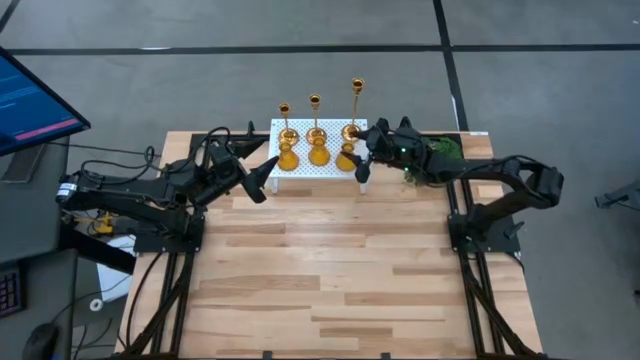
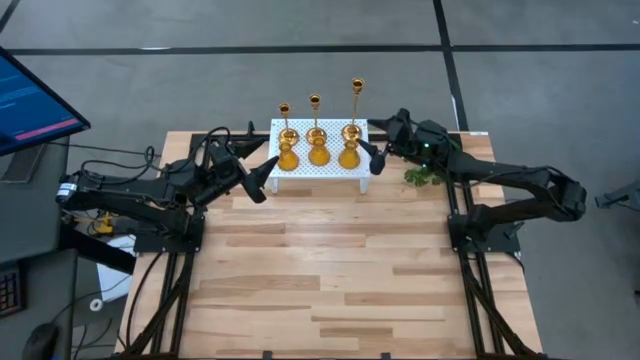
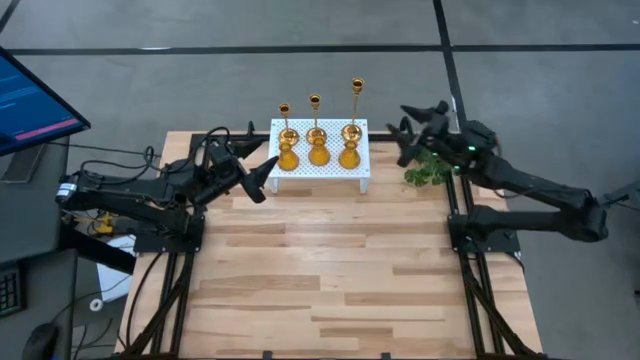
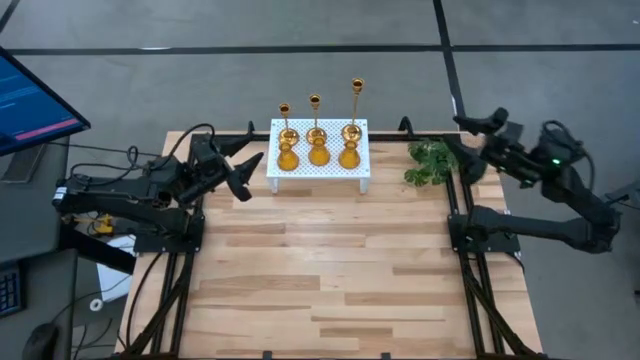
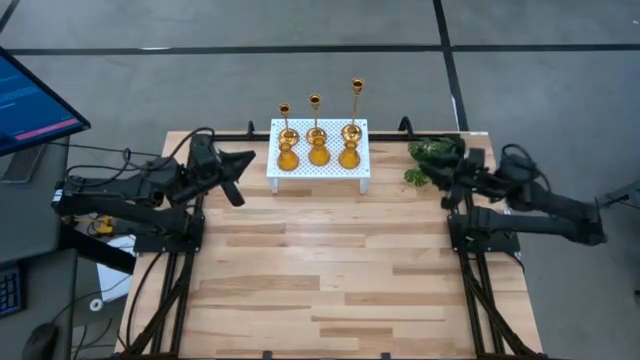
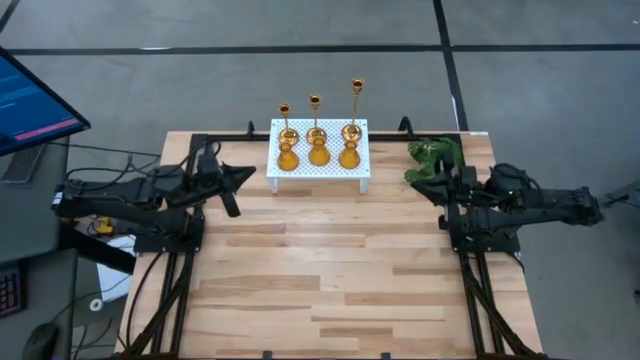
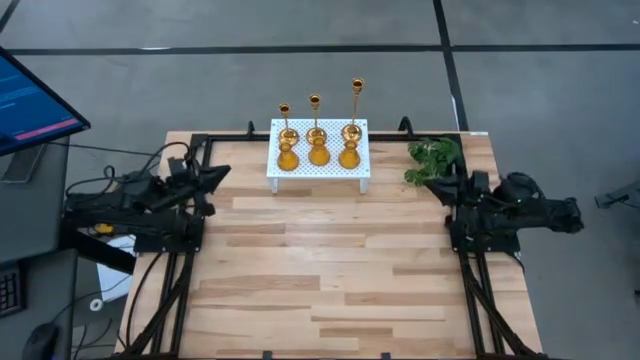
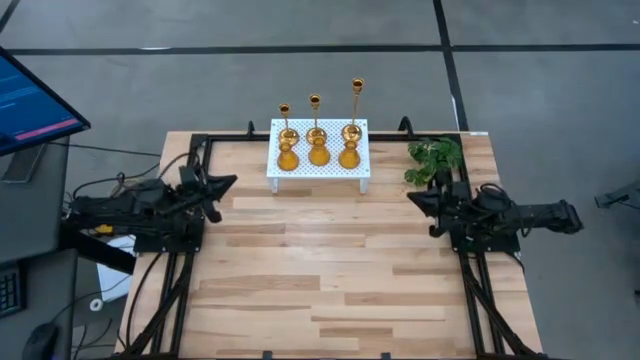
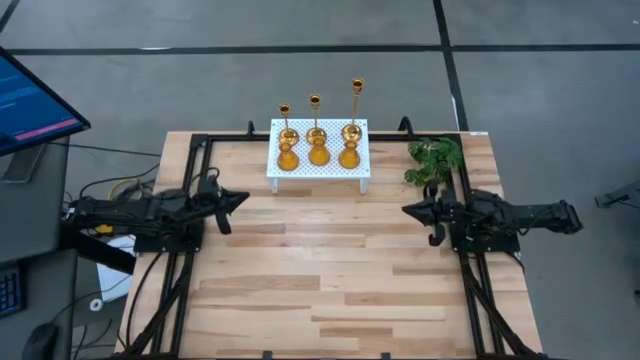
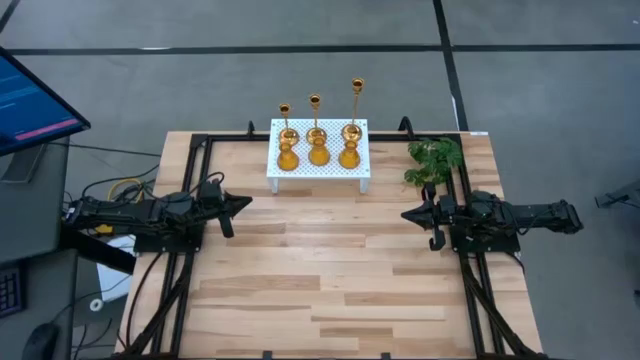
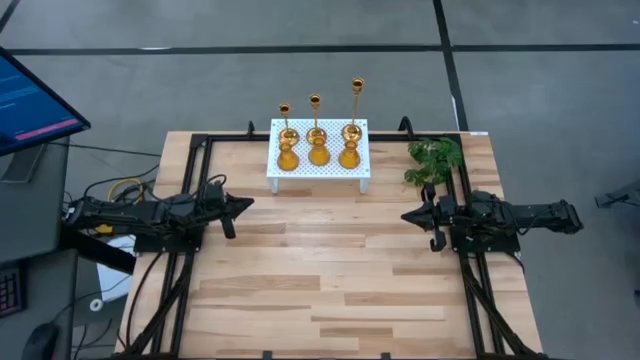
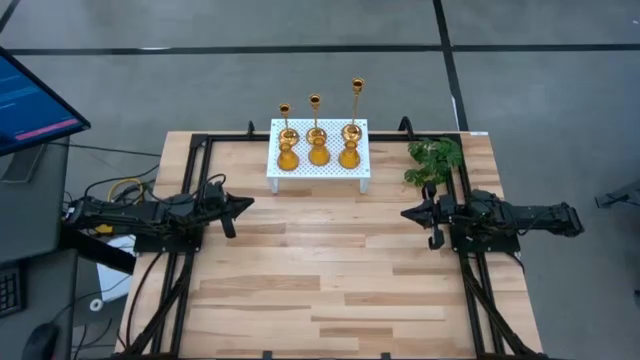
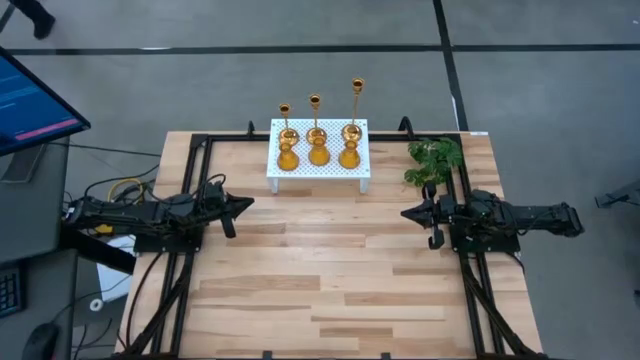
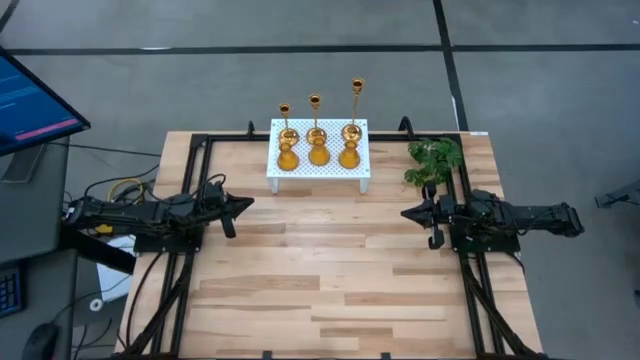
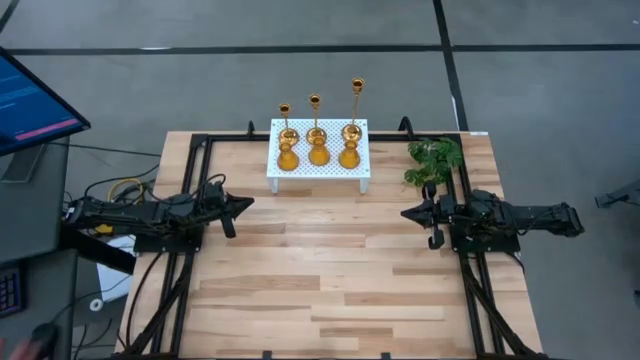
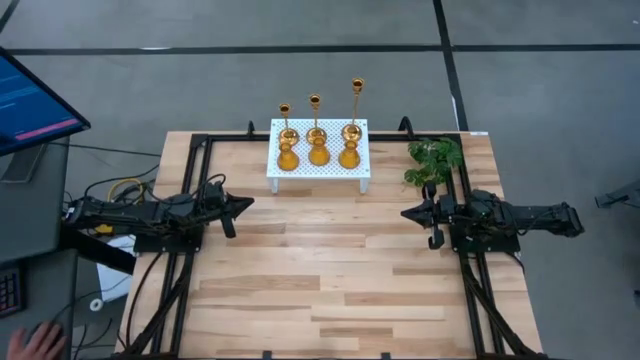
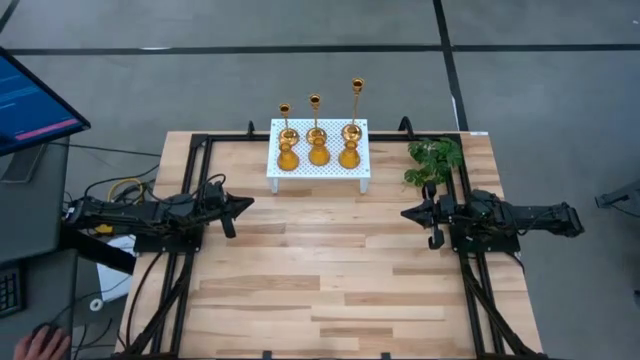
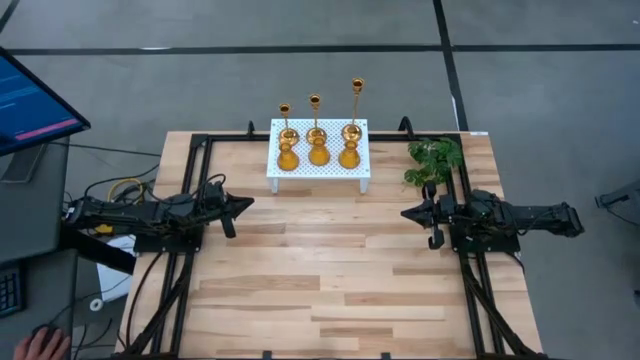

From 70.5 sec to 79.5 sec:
Task: Pick & Place candle stick holders
Return to Home Position

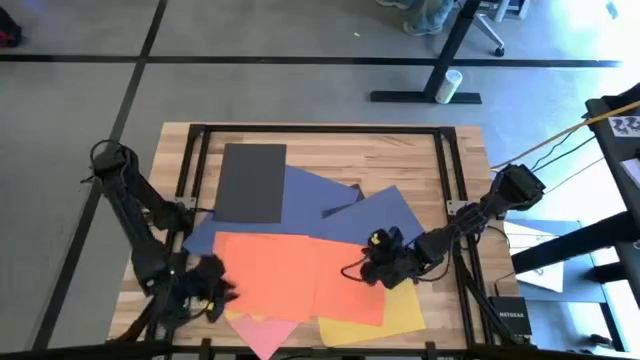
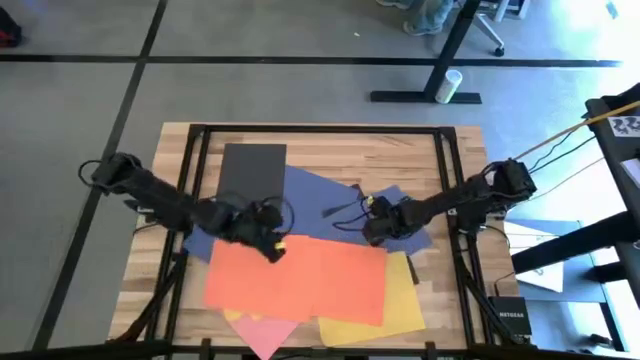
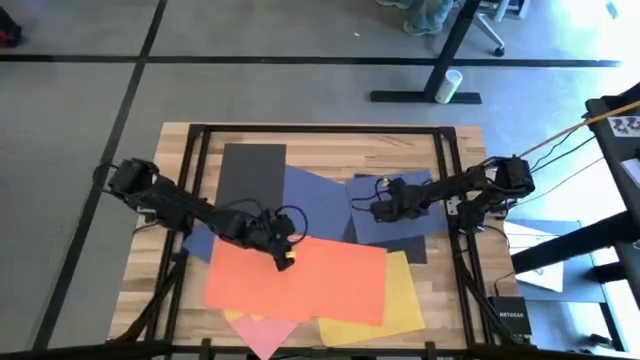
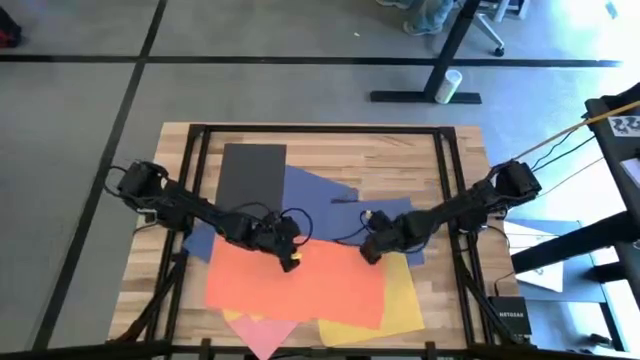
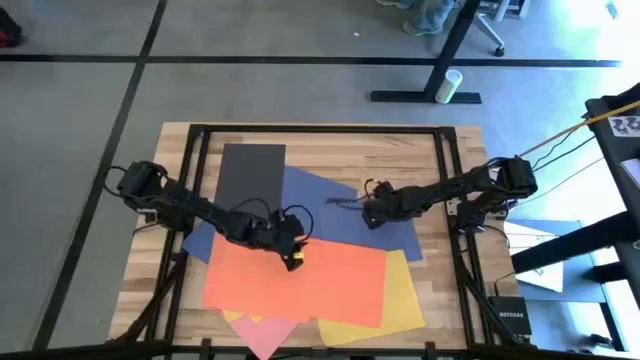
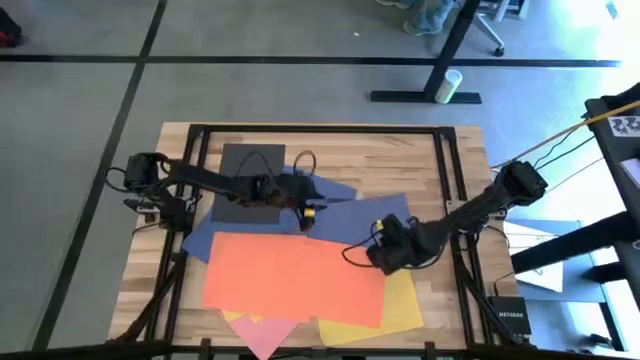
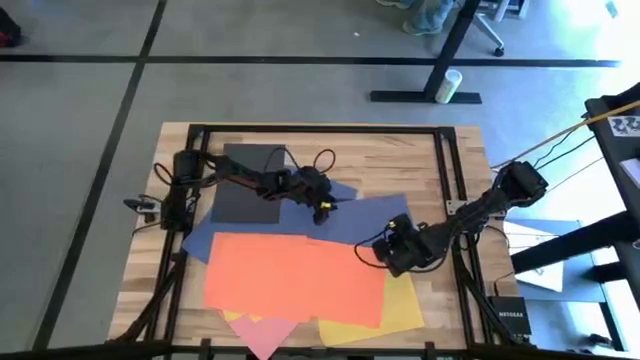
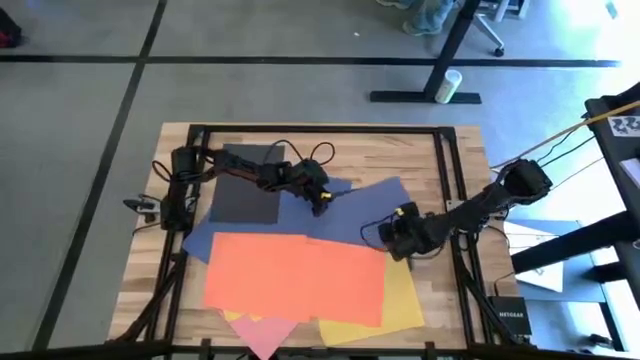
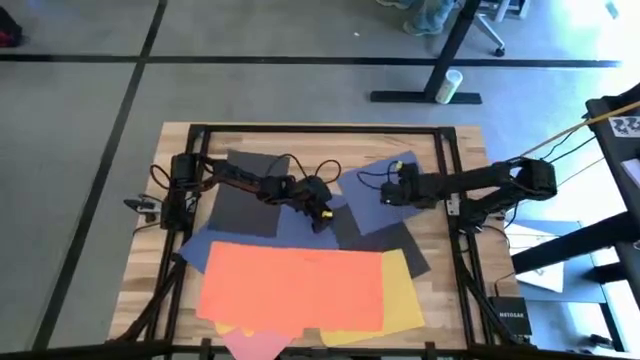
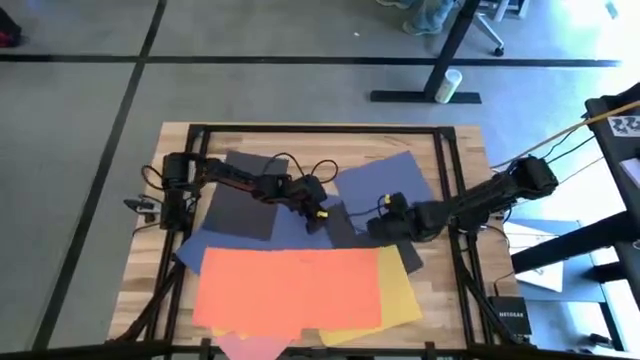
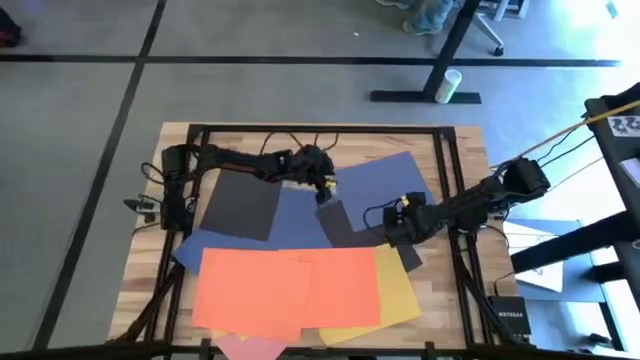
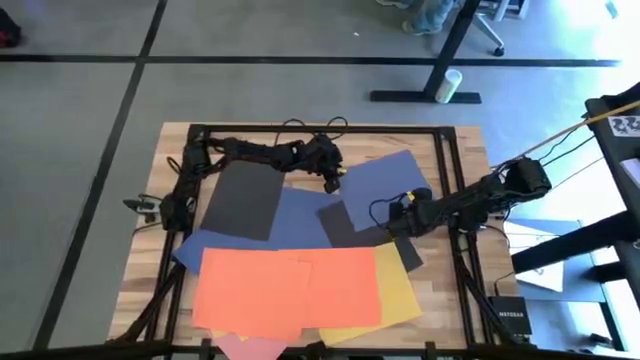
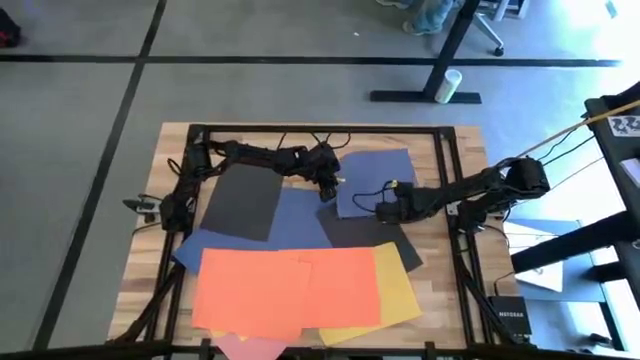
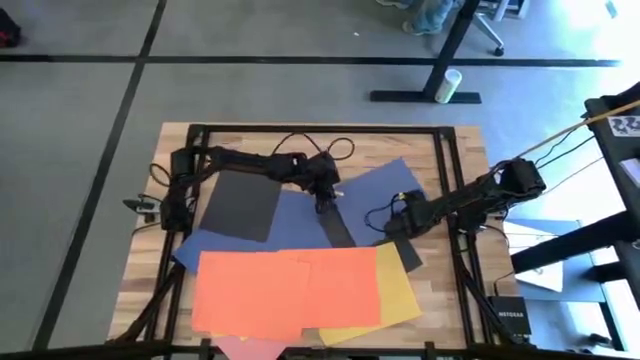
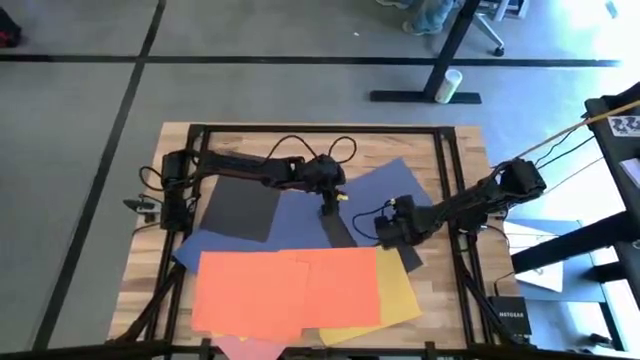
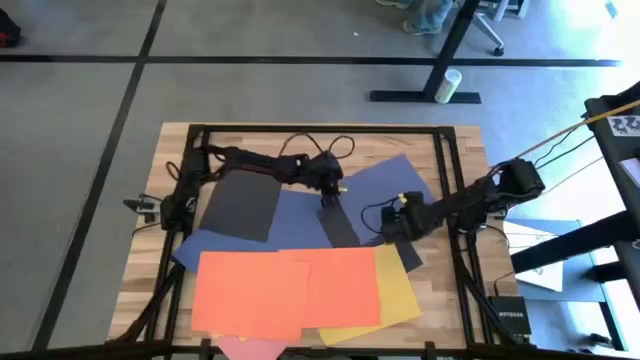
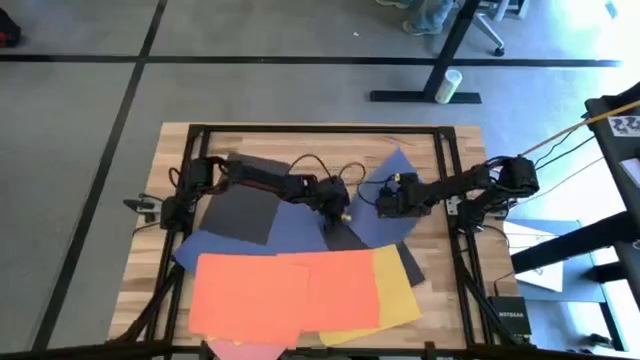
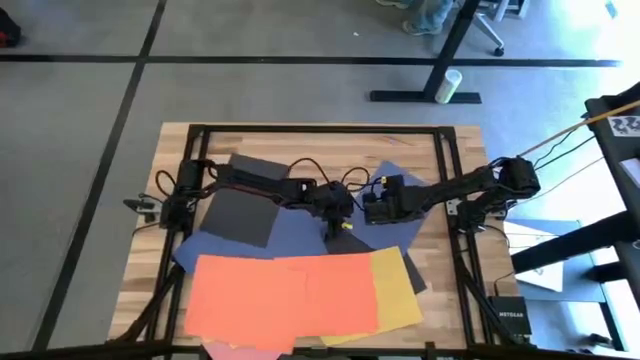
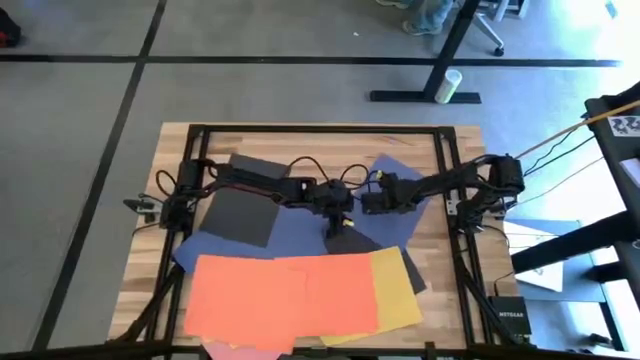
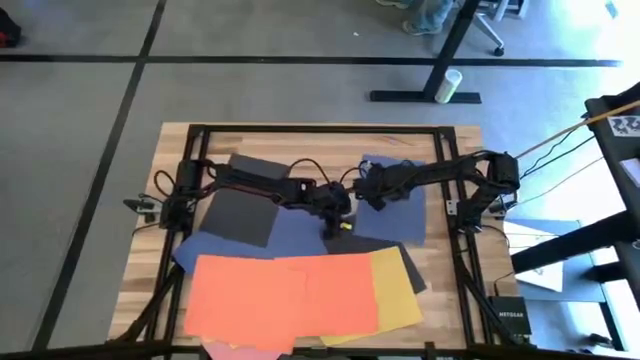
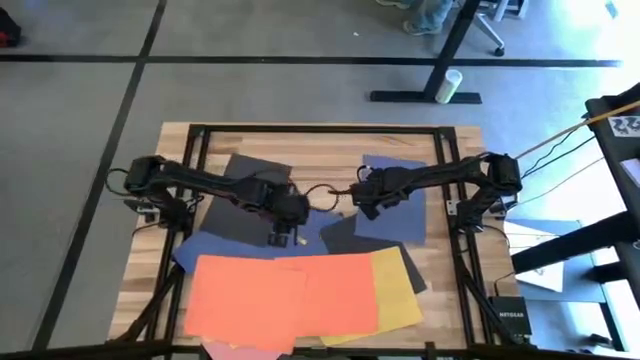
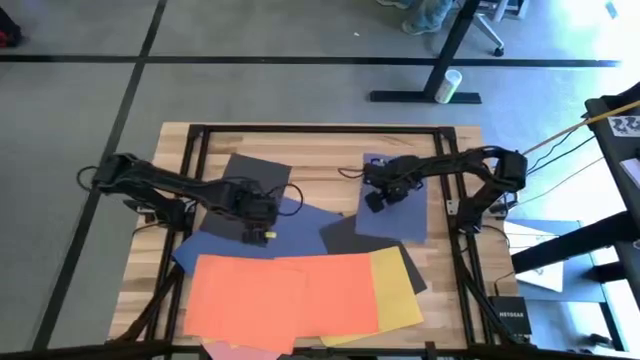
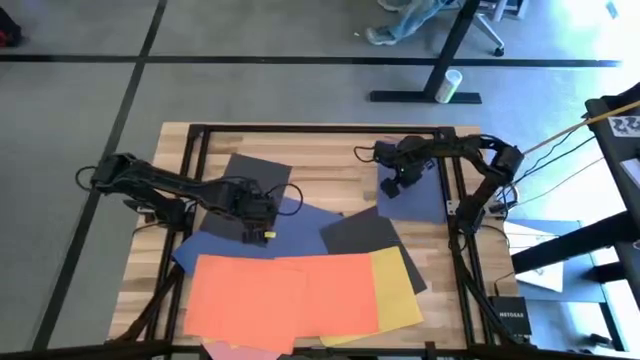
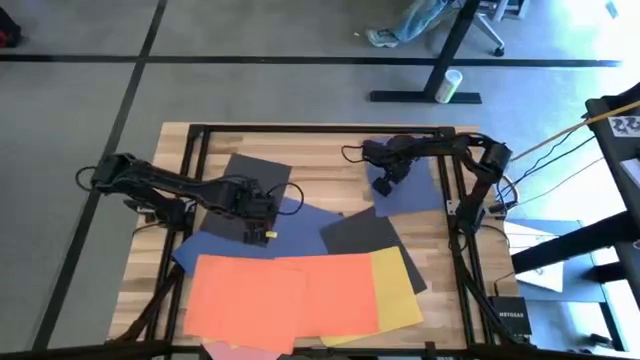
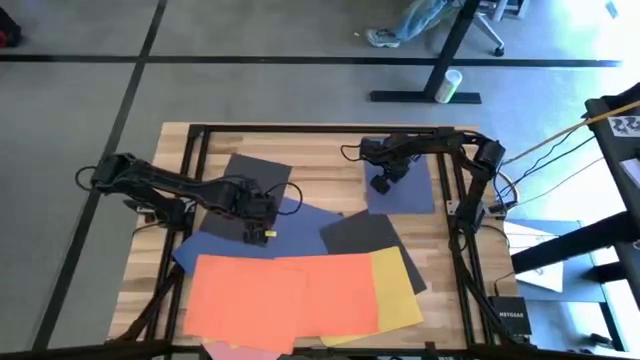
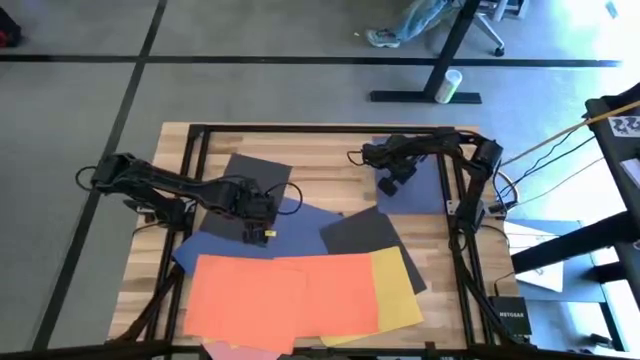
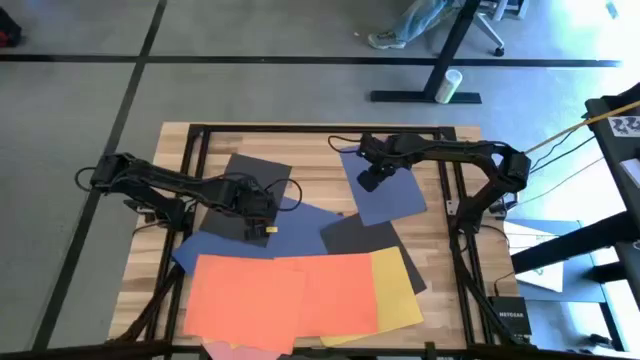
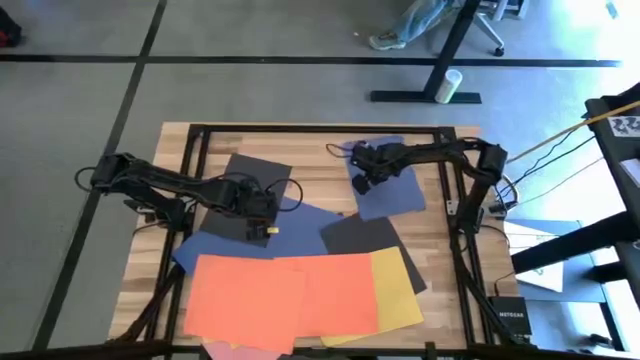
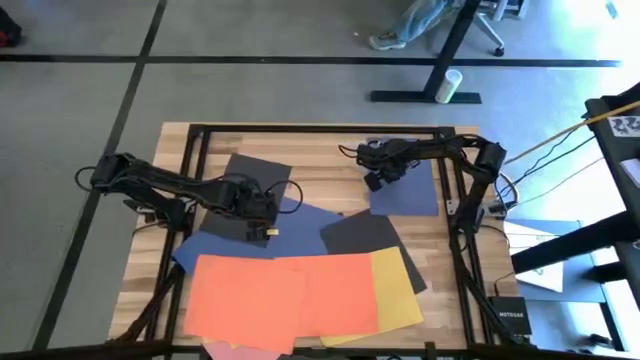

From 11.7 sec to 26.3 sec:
Task: Organize paper
Move the blue paper to the top right of the table
